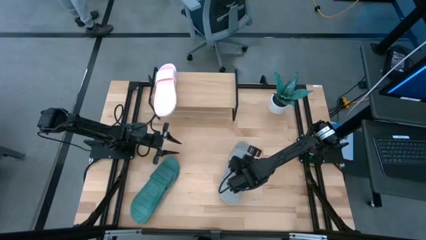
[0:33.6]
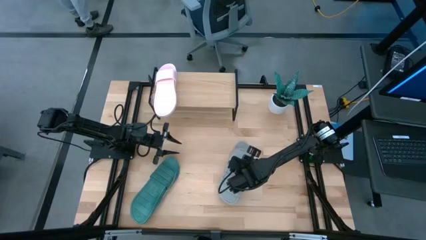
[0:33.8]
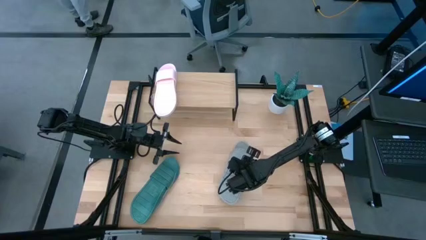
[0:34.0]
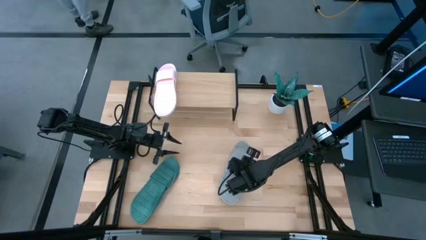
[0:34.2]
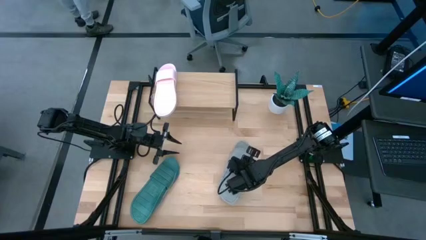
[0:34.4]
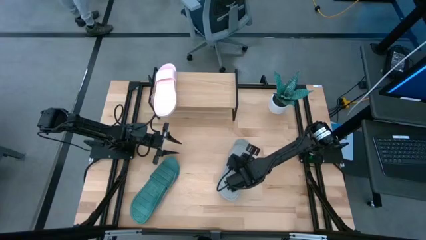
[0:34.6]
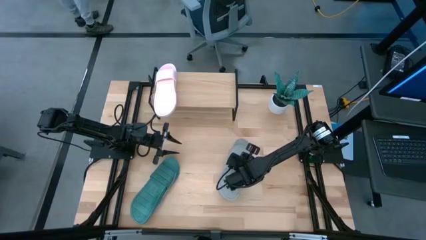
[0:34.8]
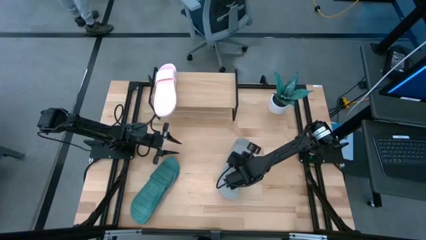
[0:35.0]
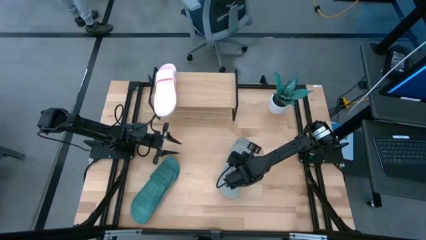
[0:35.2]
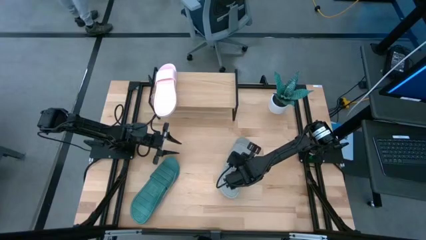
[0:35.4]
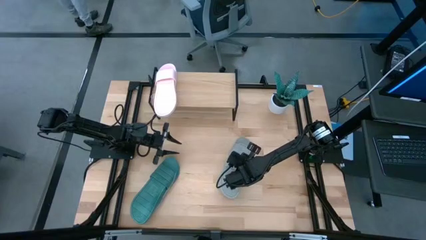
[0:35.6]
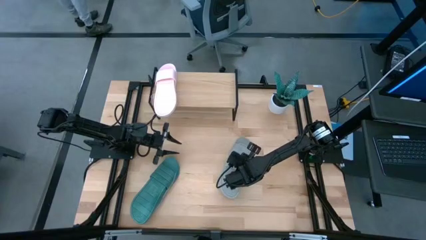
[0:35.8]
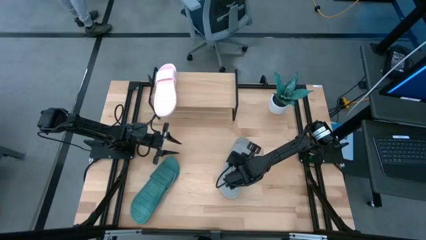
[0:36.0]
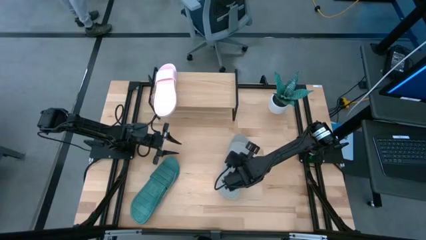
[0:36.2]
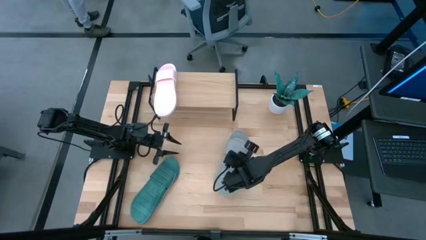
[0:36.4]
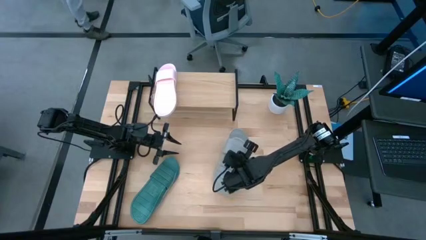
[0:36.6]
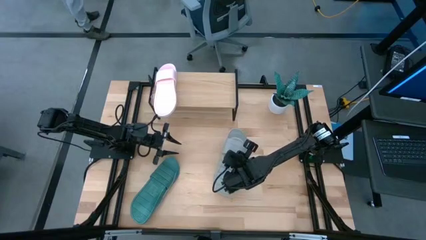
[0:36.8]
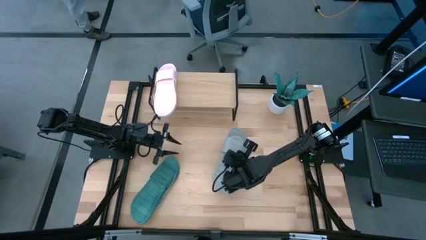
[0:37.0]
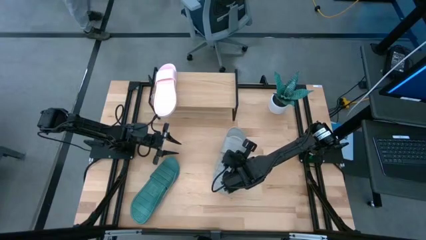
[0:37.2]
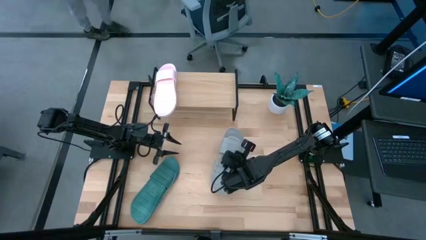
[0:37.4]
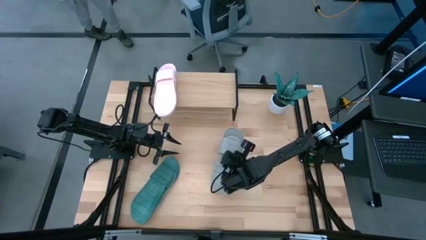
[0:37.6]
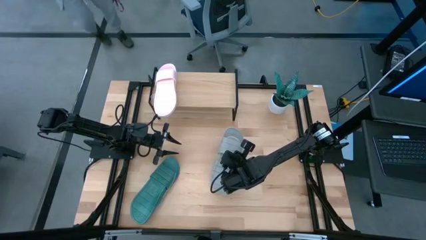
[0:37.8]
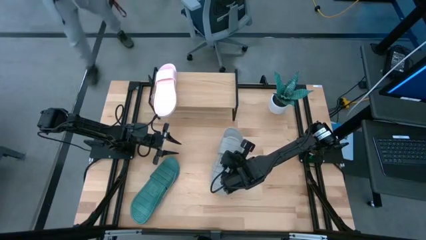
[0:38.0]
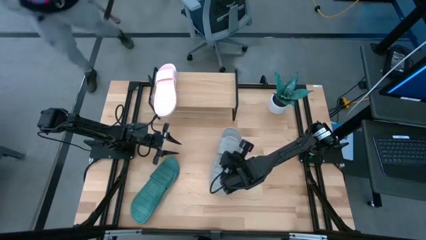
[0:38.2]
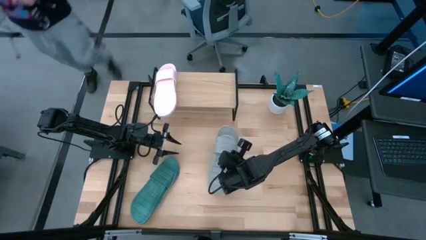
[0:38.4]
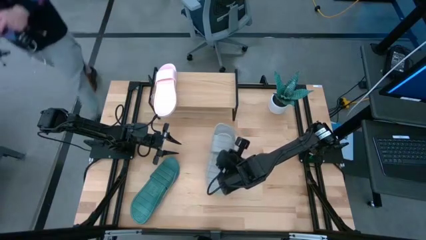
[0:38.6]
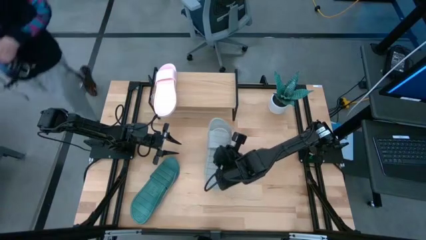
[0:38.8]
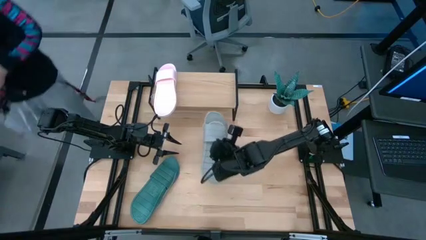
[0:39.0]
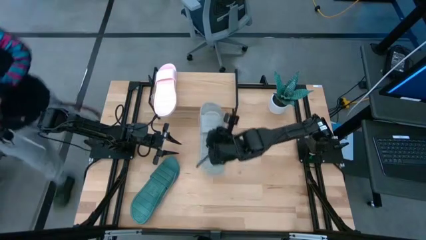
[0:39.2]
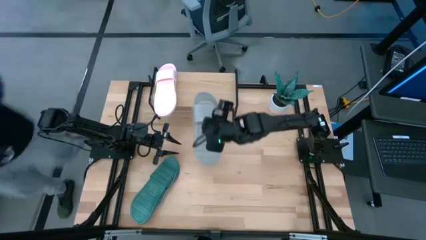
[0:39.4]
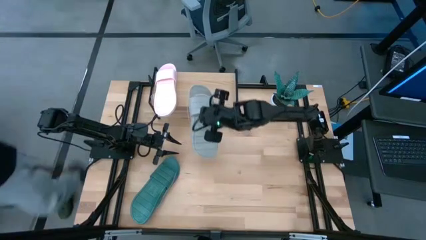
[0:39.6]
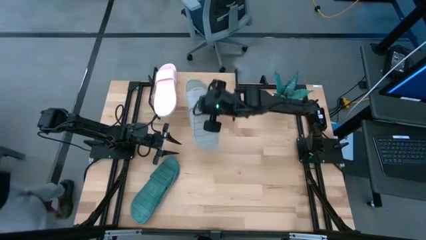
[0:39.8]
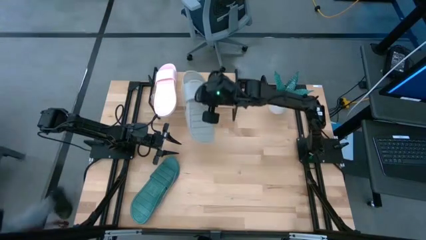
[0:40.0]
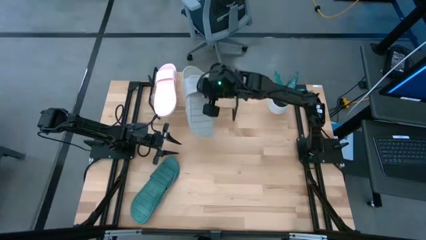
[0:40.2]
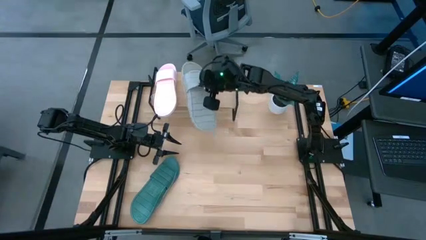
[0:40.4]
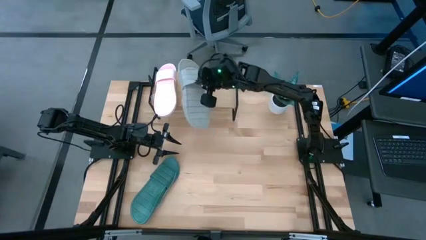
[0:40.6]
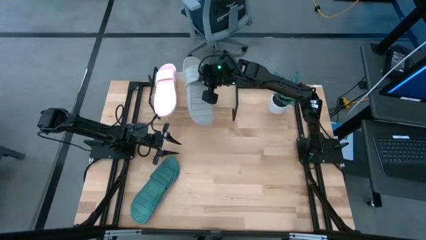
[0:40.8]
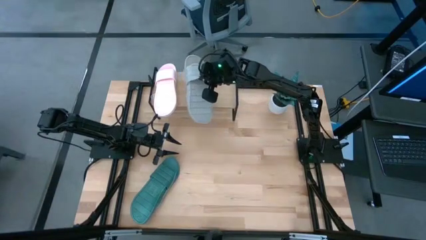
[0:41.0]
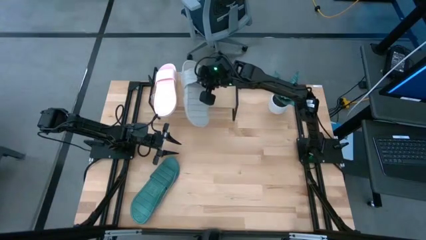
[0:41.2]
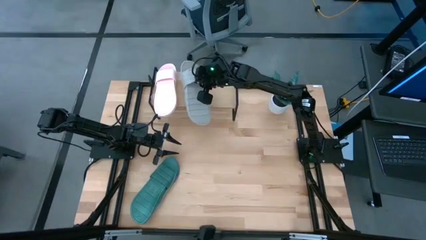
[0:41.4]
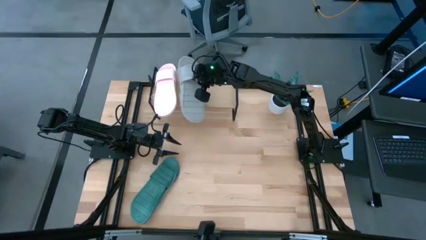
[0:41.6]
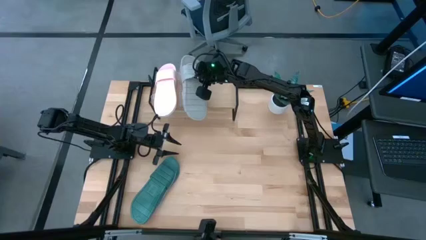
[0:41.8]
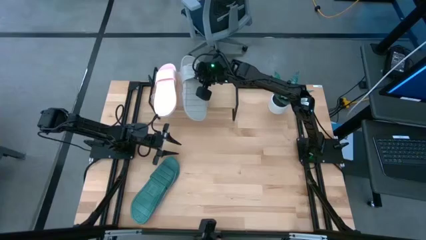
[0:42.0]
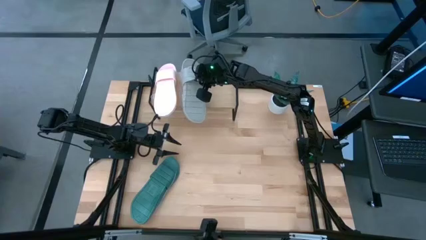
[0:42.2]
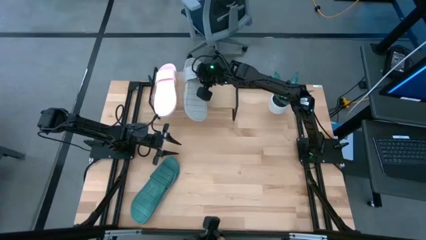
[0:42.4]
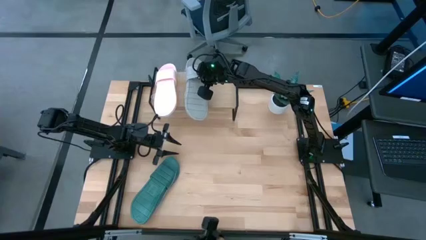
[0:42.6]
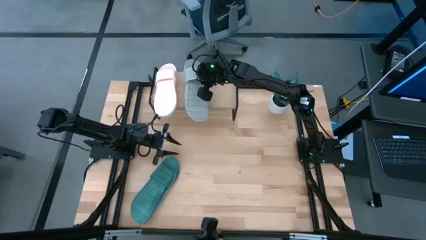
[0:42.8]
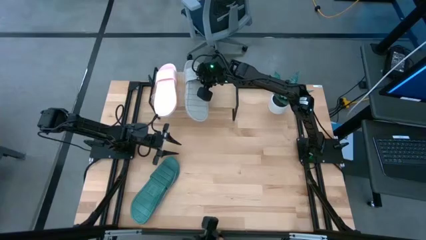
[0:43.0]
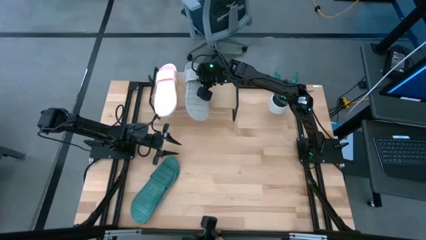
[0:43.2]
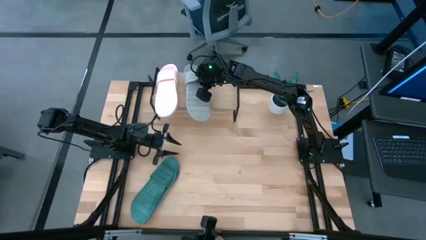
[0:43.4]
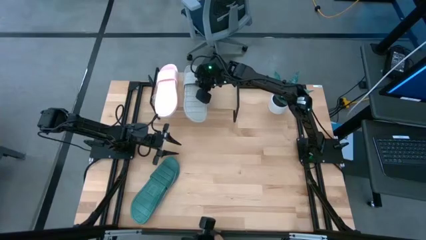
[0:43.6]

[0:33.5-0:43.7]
Task: Pick and place slides into the shelf
Put the gray pair of slides on the shelf

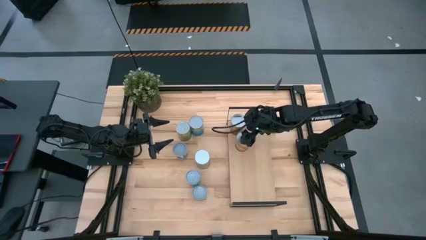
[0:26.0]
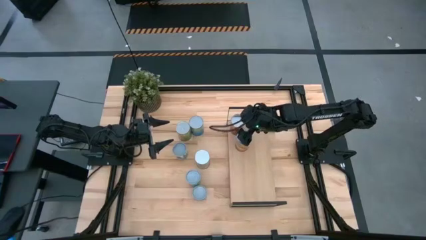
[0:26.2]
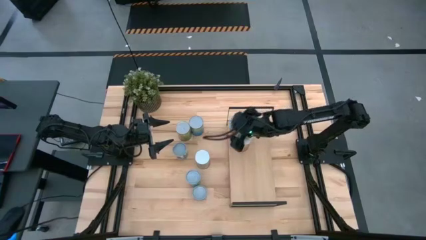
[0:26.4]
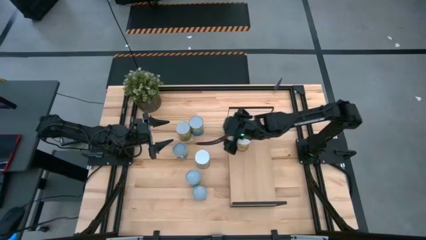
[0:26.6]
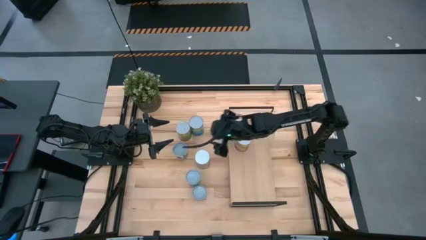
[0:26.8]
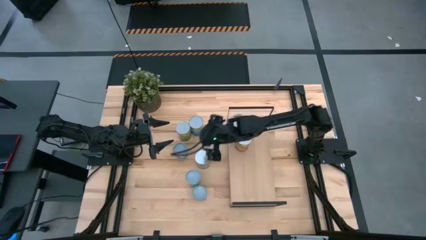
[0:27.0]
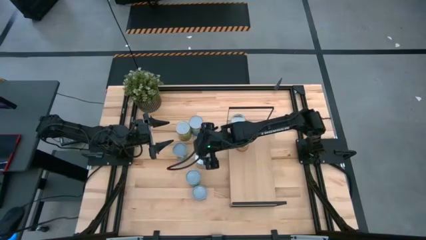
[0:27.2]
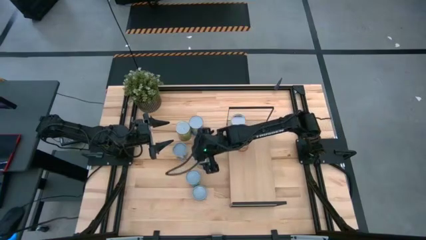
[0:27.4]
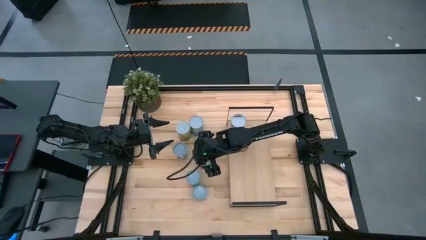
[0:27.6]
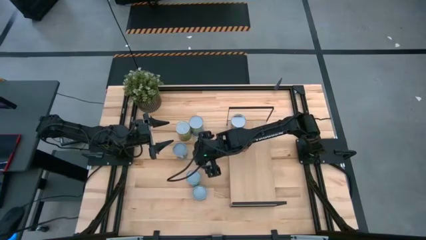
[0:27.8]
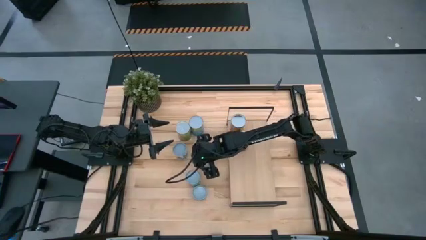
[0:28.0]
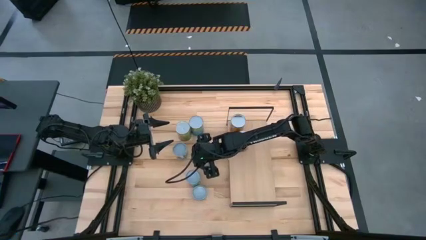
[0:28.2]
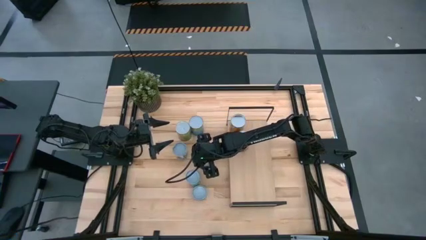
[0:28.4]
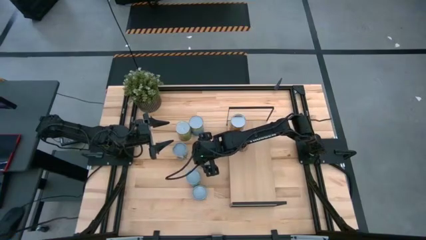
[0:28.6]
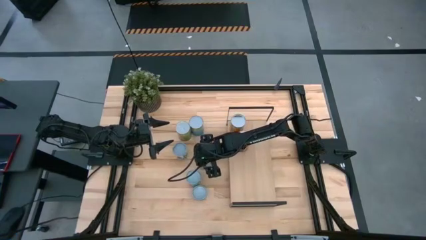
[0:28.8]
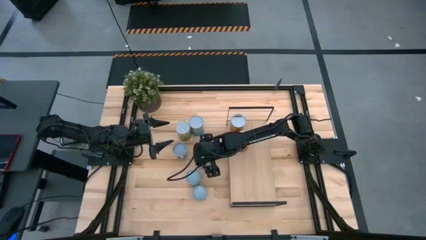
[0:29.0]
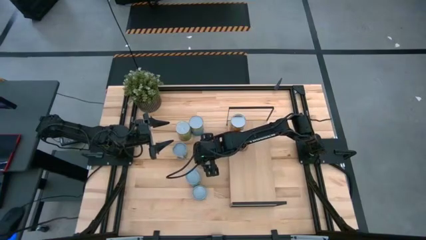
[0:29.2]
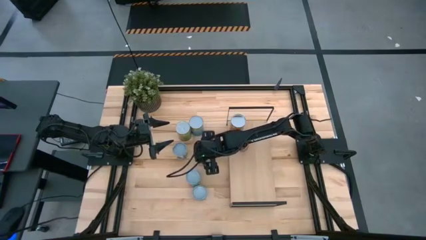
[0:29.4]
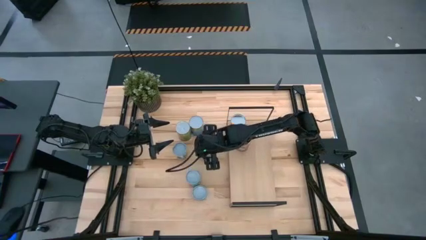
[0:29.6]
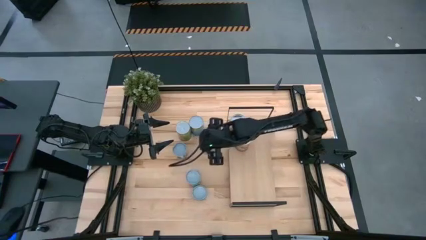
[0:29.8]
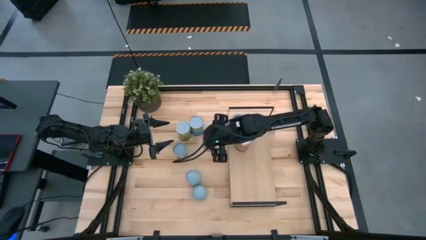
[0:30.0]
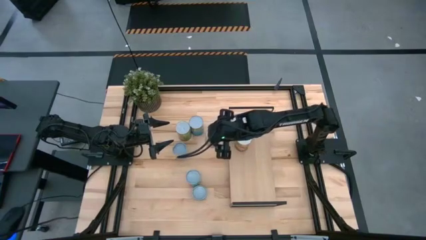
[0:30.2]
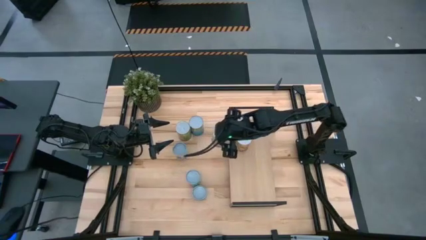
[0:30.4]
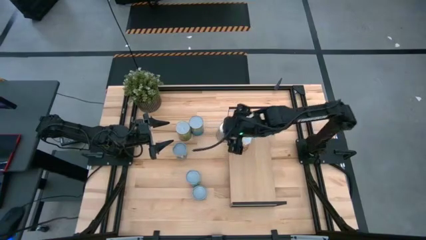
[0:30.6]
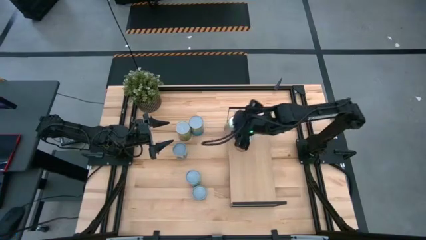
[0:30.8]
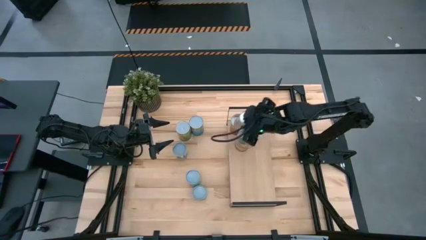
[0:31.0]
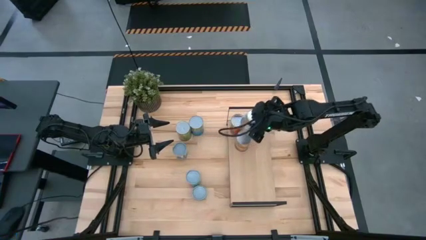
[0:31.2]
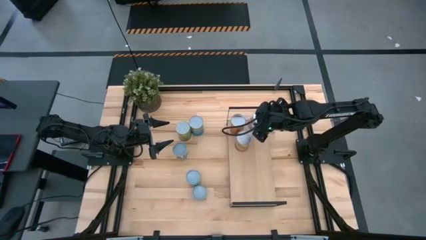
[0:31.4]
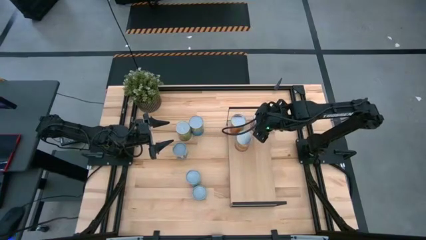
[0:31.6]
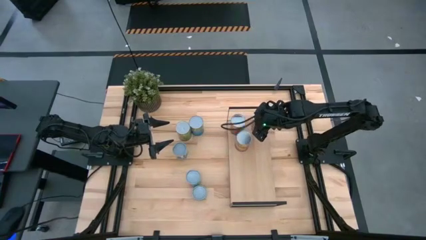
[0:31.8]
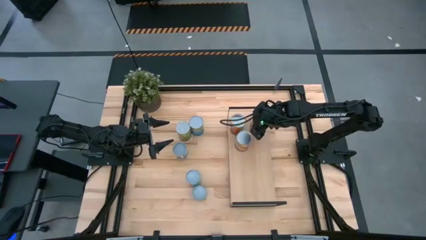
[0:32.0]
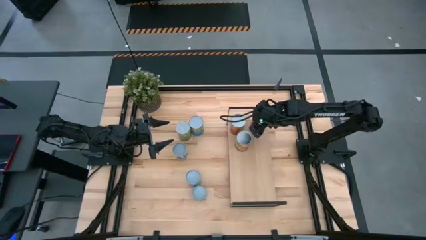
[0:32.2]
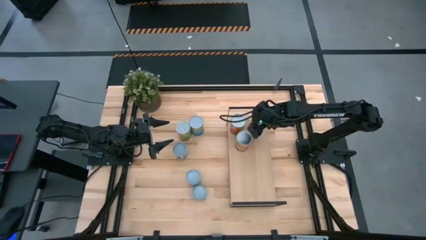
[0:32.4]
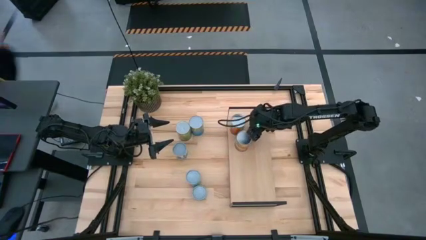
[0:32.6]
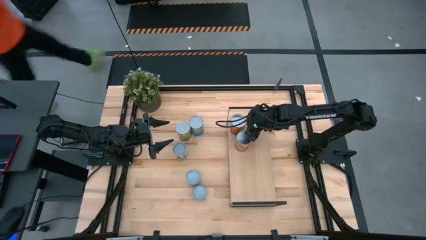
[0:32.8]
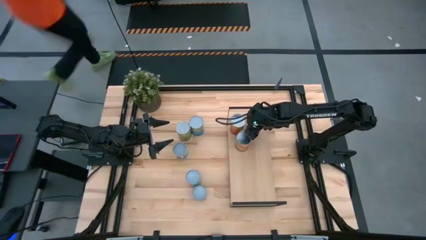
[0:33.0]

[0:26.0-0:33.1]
Task: Pick and place cans onto a shelf
Put the canned peaches on the shelf
